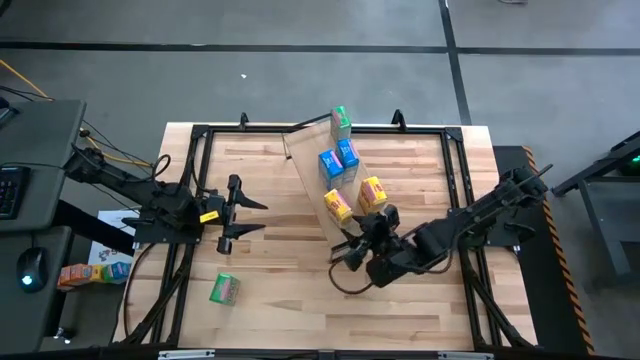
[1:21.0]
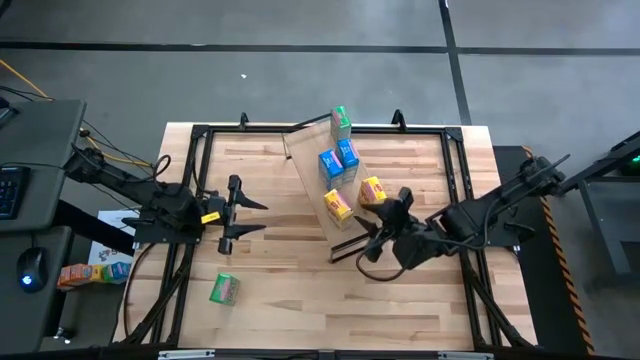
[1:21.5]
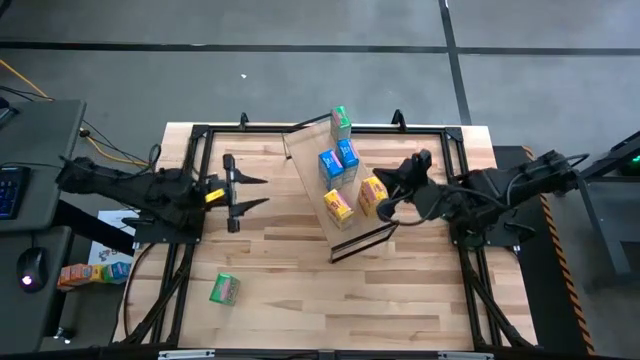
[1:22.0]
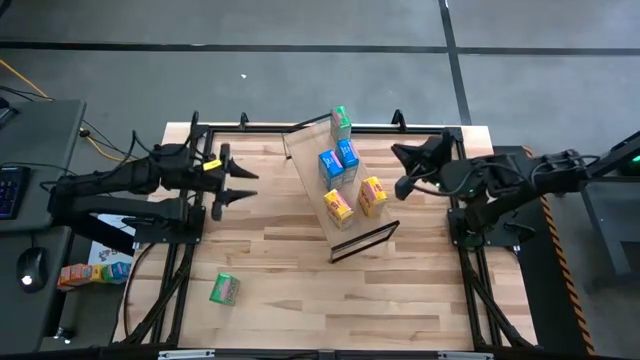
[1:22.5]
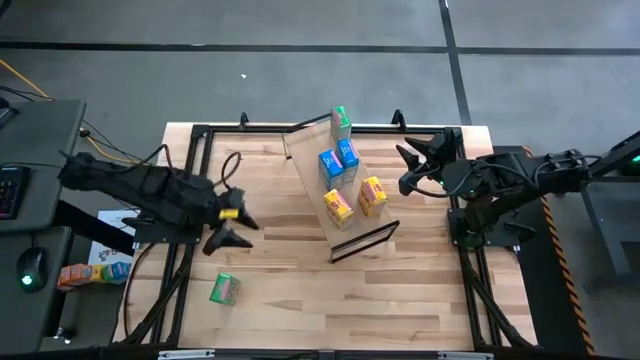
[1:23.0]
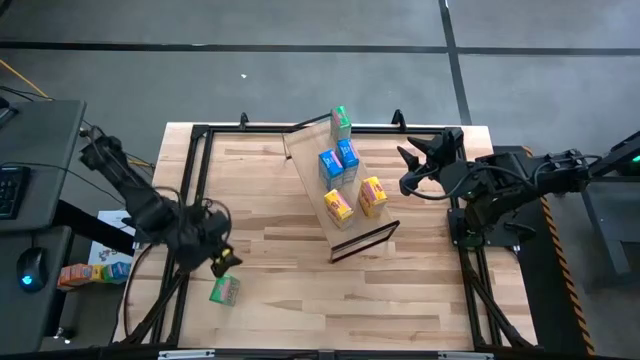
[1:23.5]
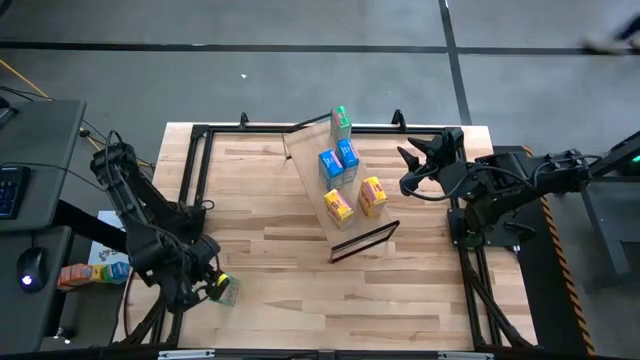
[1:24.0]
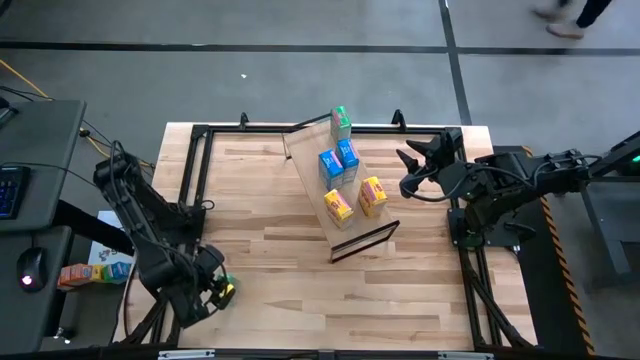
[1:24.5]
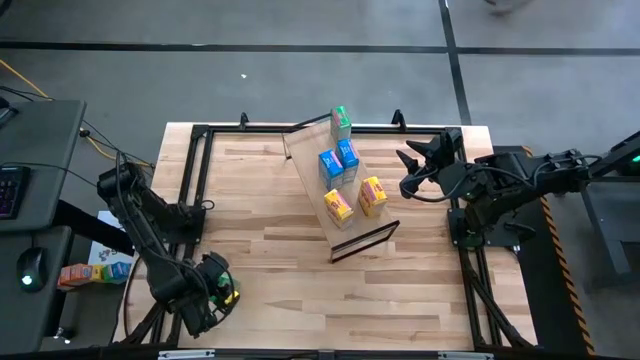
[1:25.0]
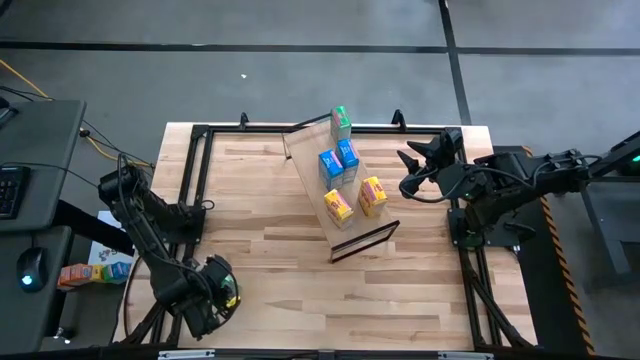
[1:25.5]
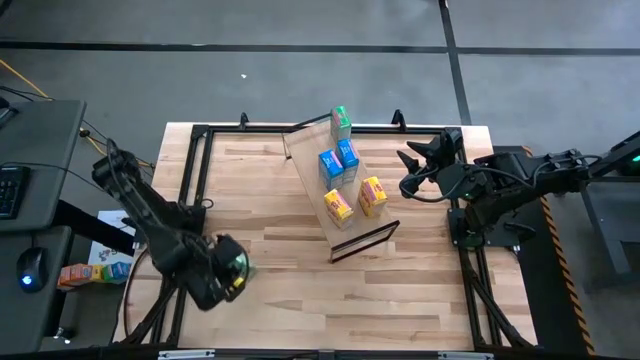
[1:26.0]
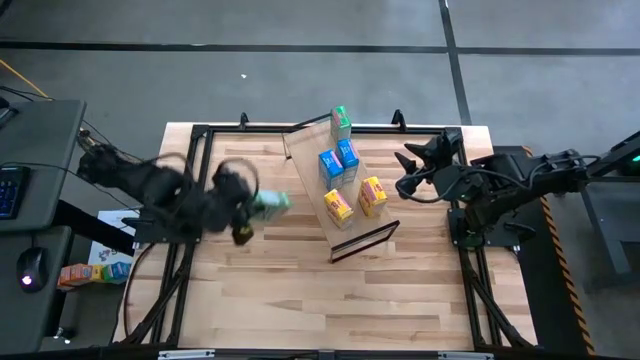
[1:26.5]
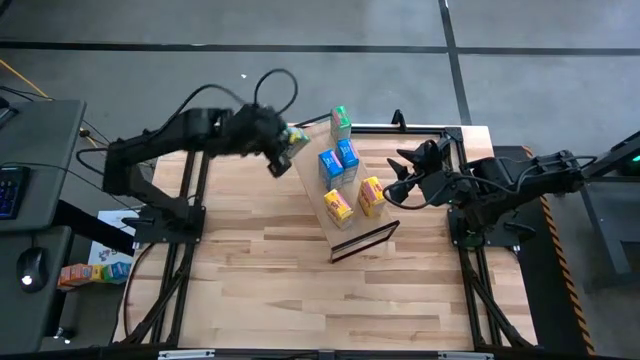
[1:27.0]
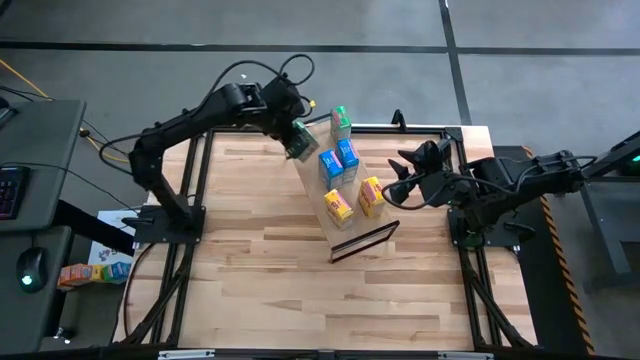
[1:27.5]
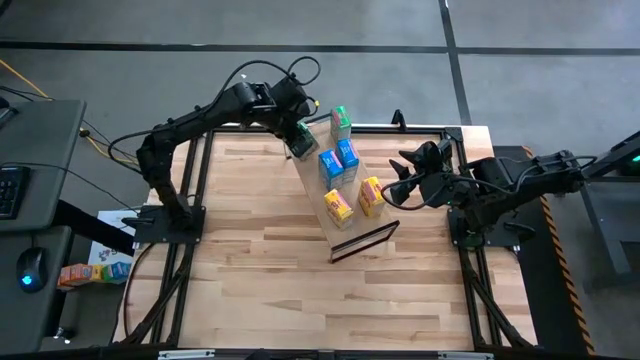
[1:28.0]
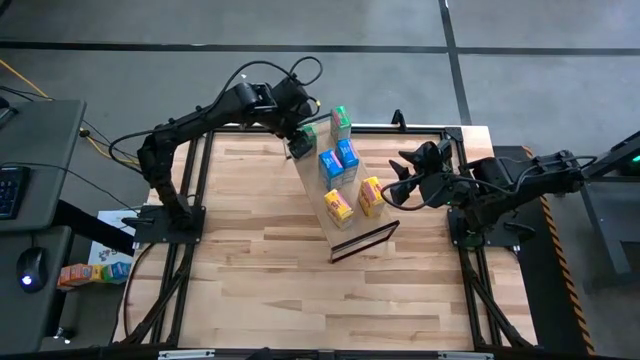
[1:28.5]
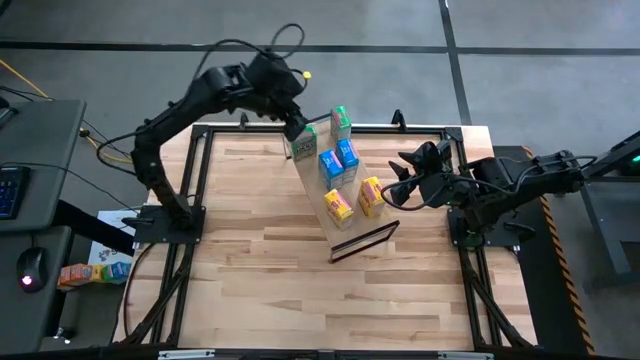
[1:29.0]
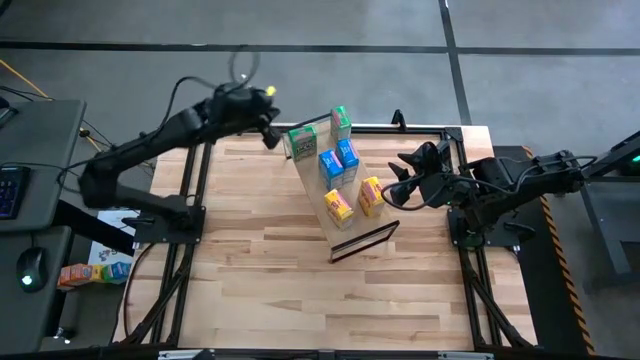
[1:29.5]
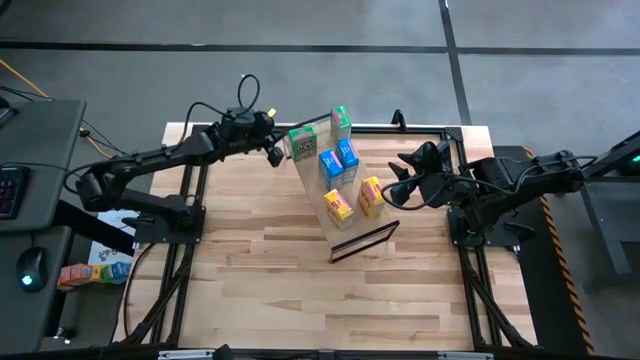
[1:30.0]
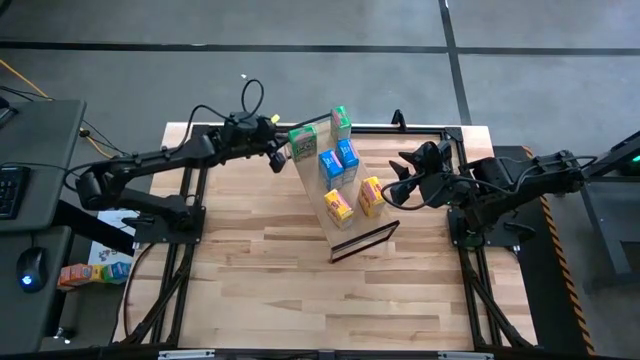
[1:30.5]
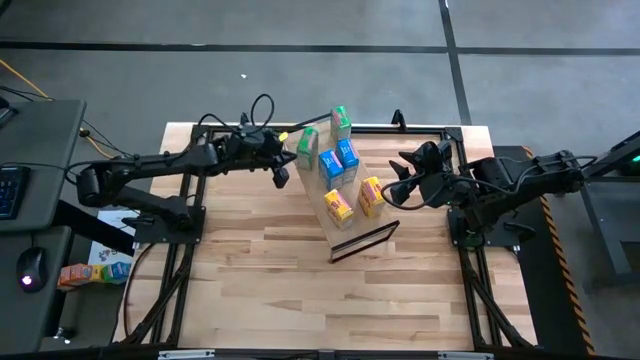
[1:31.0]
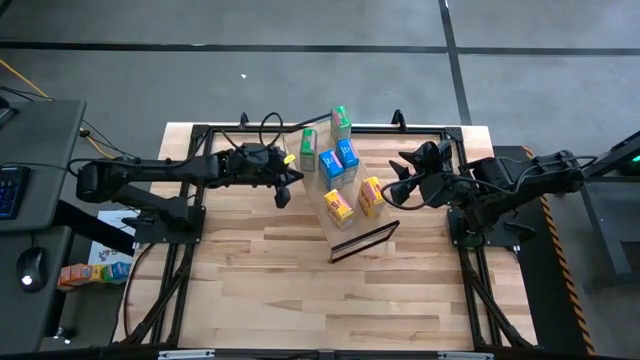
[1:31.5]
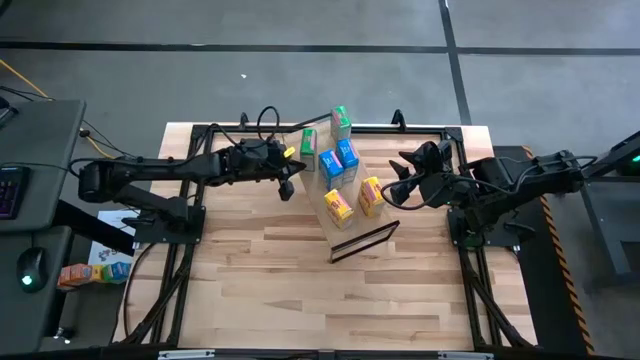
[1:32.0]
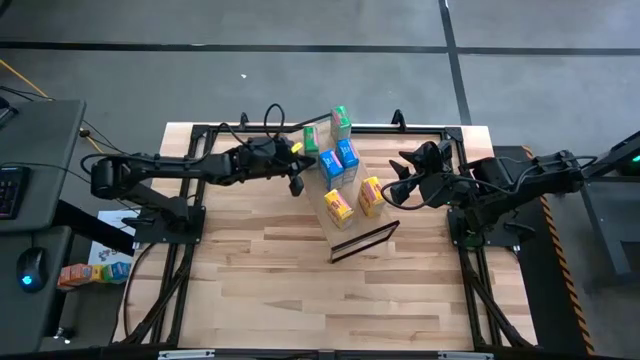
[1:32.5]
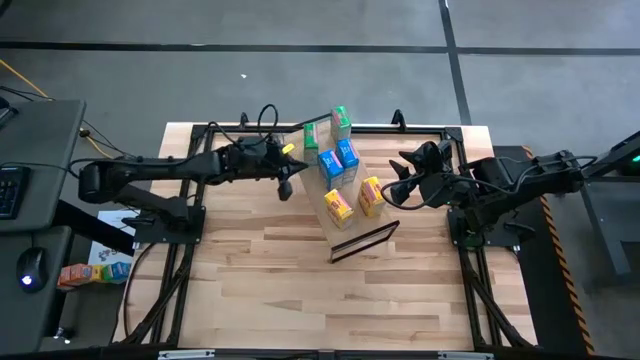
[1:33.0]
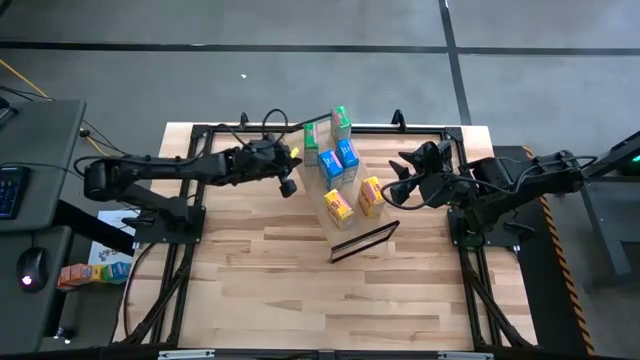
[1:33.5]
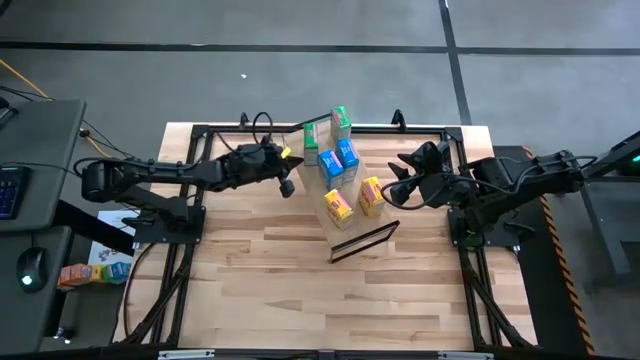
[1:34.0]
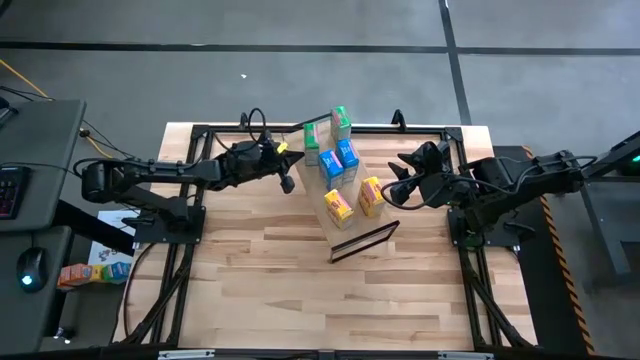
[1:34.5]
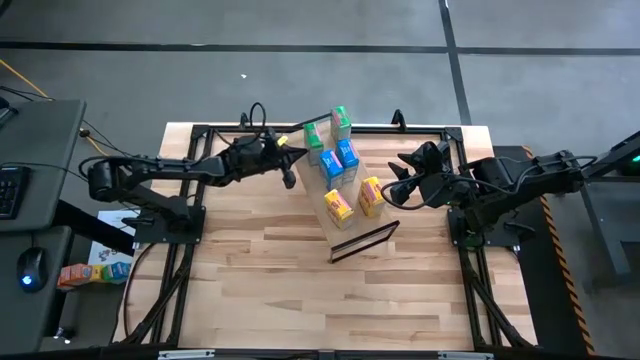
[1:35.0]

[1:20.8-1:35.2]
Task: Stack cereal on shelf
Put the green cereal box on the shelf aligned with the other green cereal box

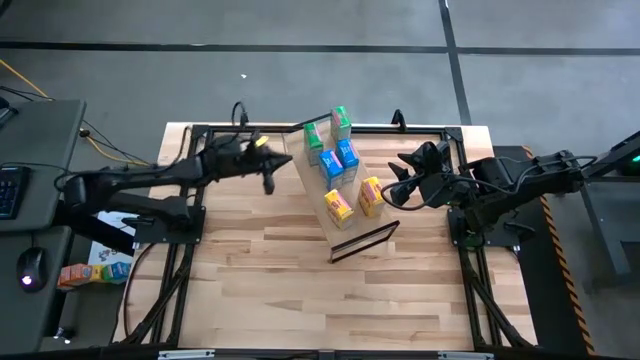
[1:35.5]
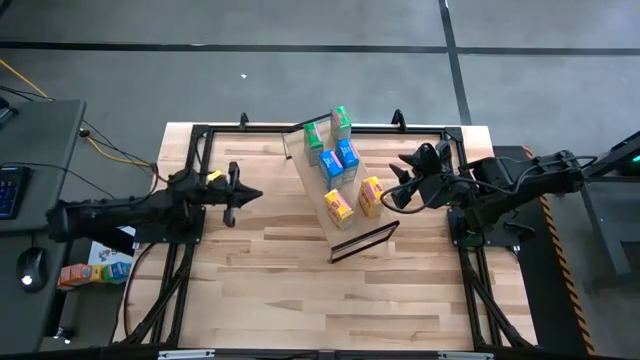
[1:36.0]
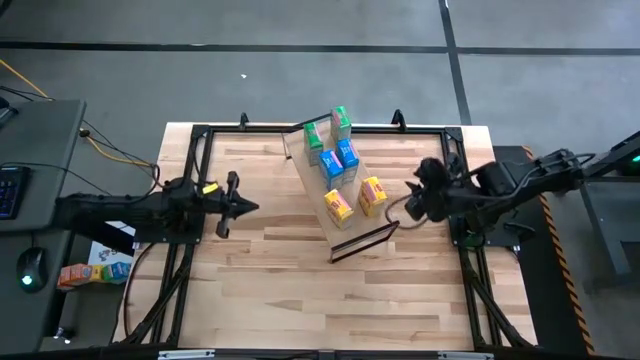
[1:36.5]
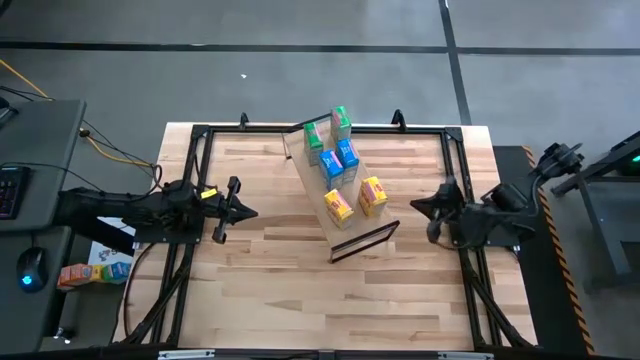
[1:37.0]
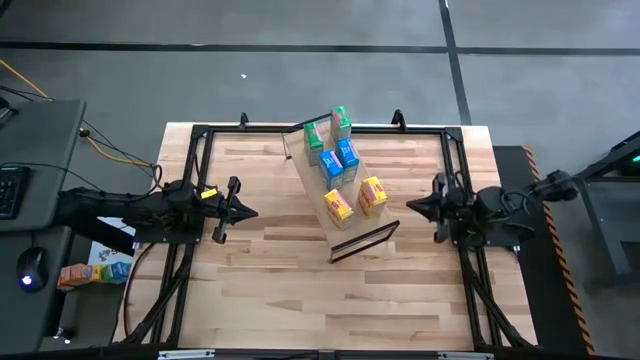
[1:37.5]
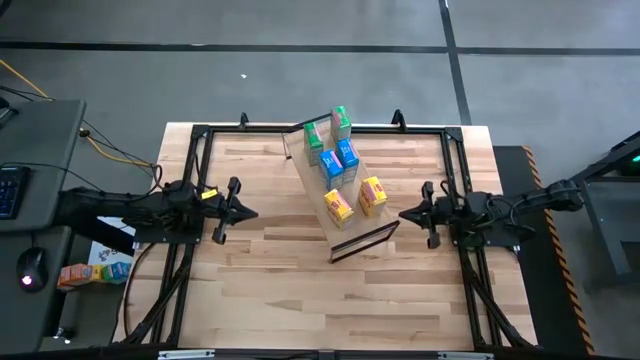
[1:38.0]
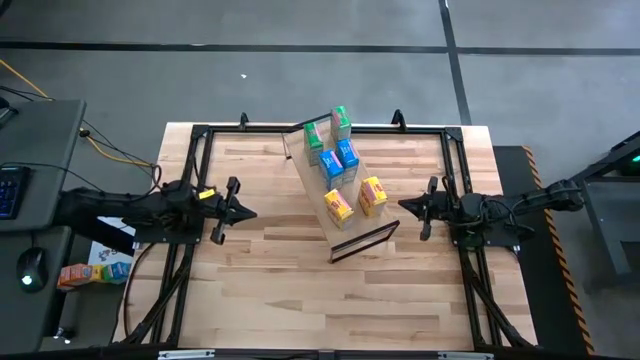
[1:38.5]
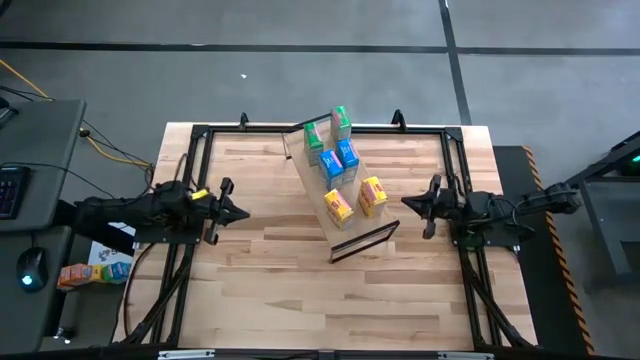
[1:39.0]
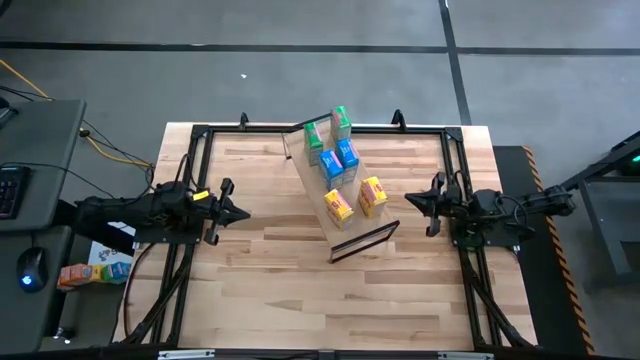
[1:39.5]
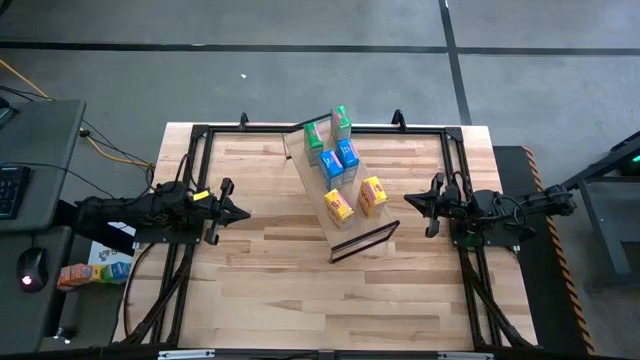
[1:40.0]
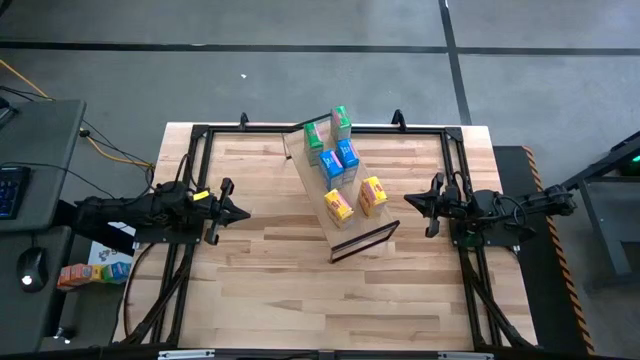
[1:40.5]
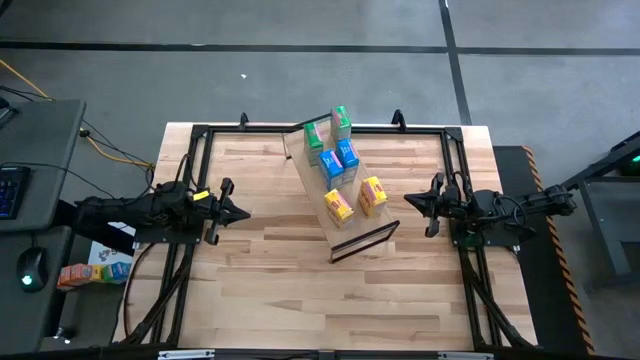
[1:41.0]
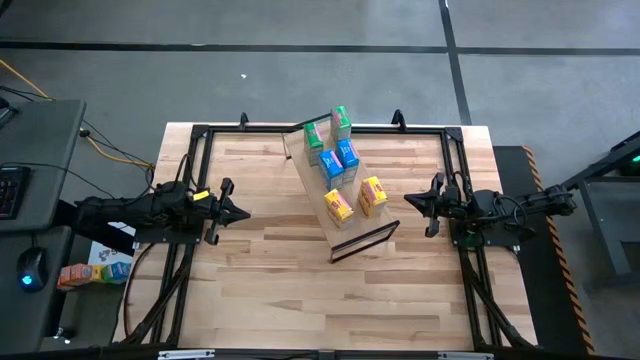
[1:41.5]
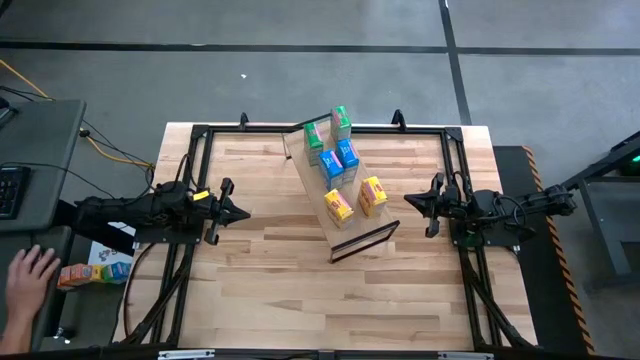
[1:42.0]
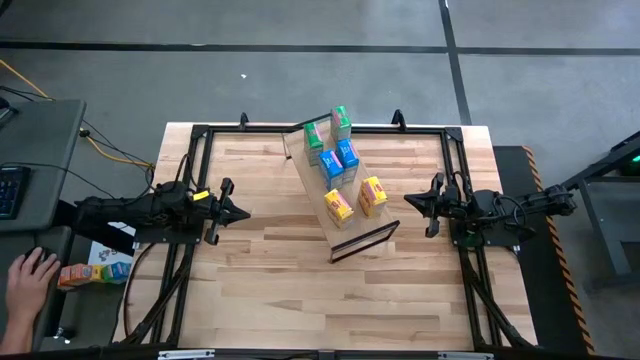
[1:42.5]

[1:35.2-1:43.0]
Return to Home Position
